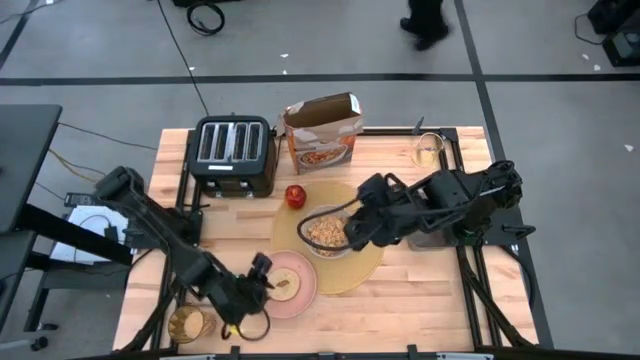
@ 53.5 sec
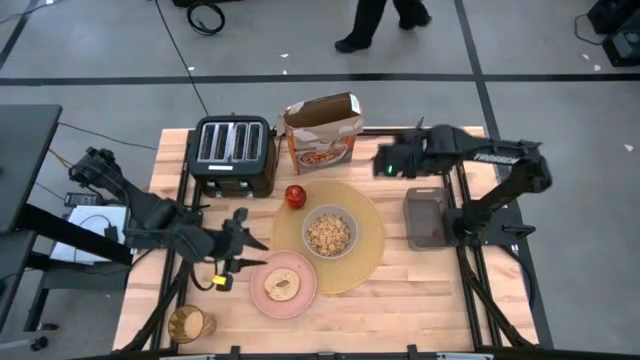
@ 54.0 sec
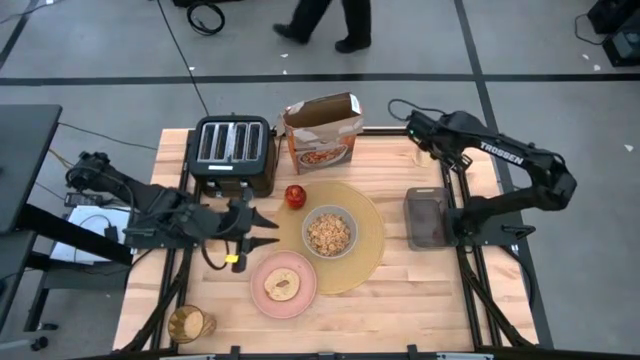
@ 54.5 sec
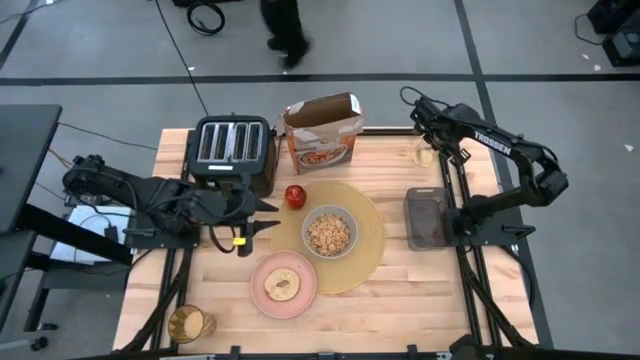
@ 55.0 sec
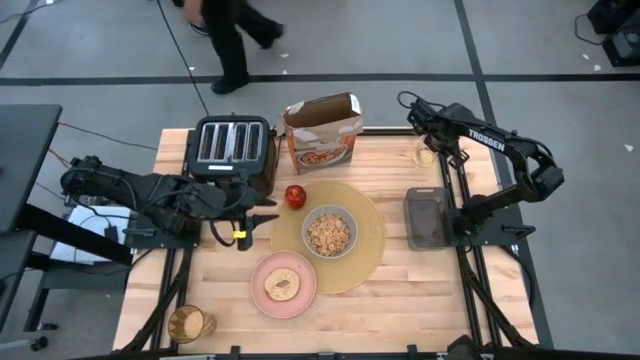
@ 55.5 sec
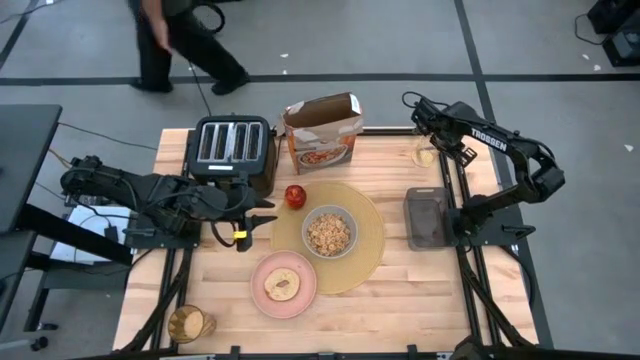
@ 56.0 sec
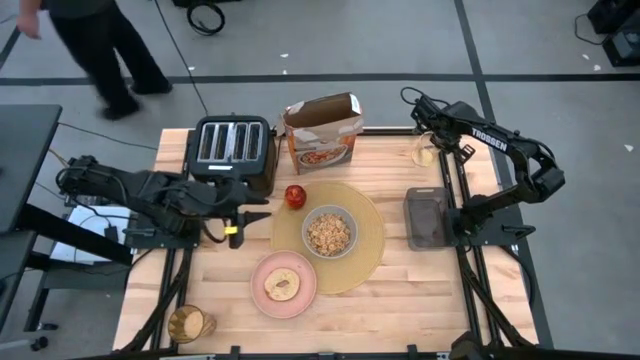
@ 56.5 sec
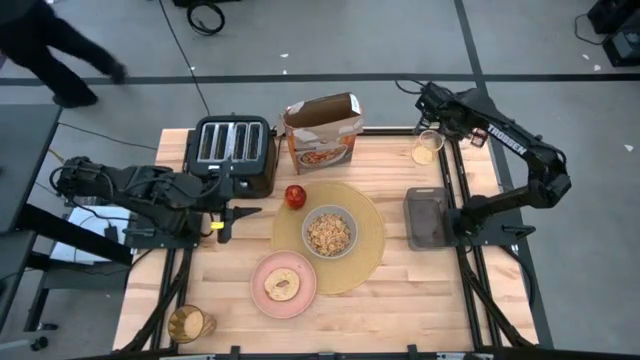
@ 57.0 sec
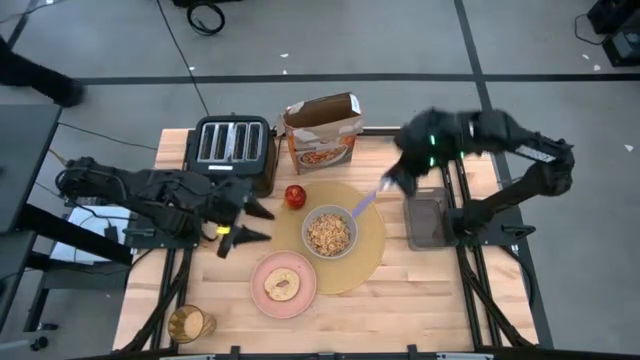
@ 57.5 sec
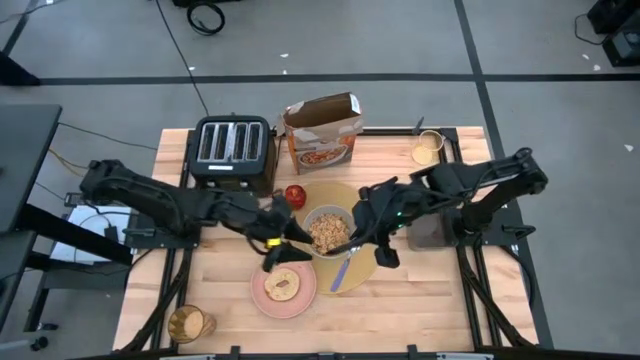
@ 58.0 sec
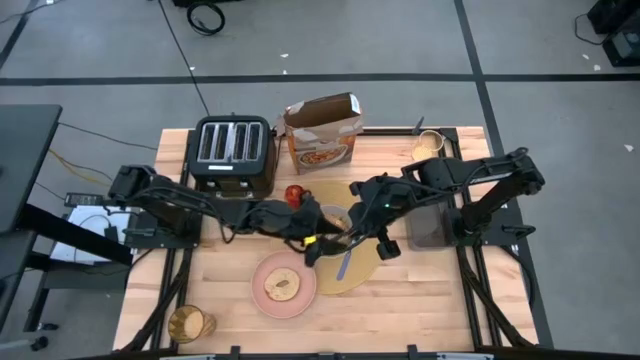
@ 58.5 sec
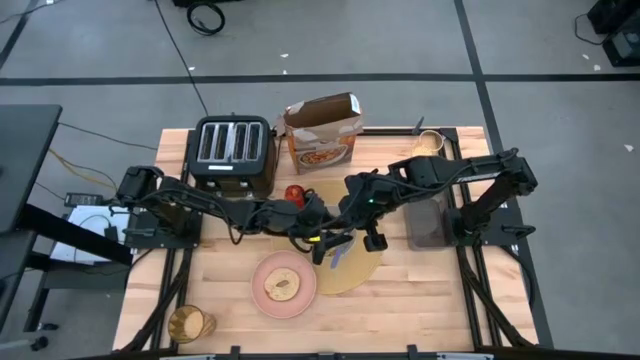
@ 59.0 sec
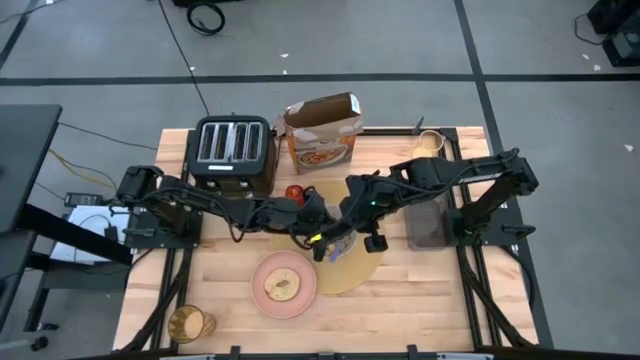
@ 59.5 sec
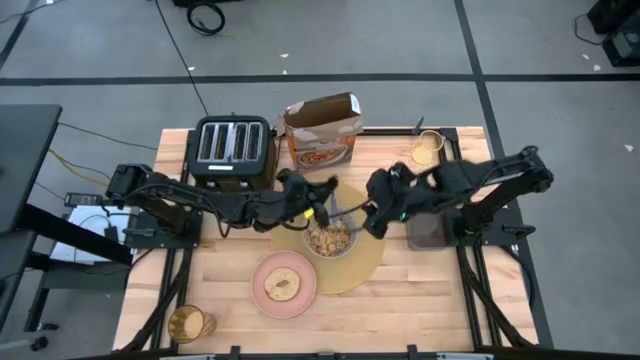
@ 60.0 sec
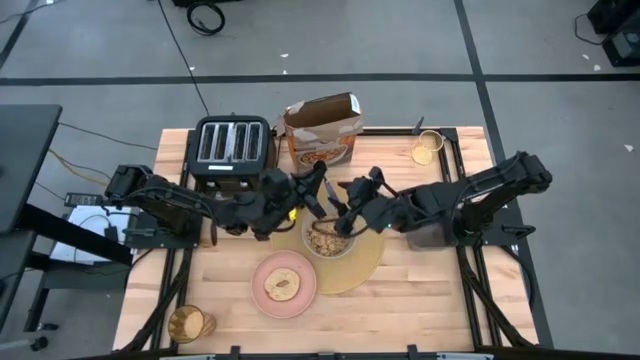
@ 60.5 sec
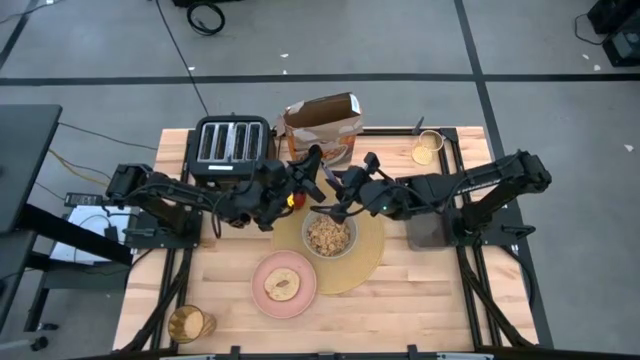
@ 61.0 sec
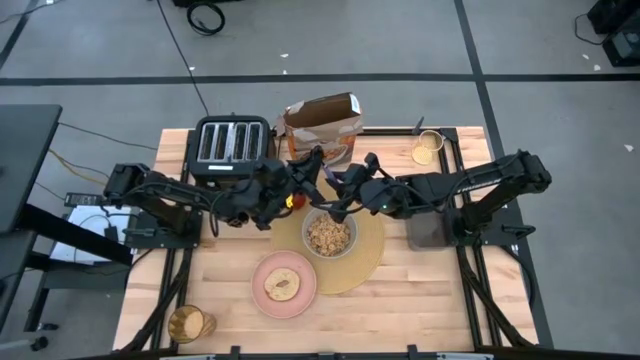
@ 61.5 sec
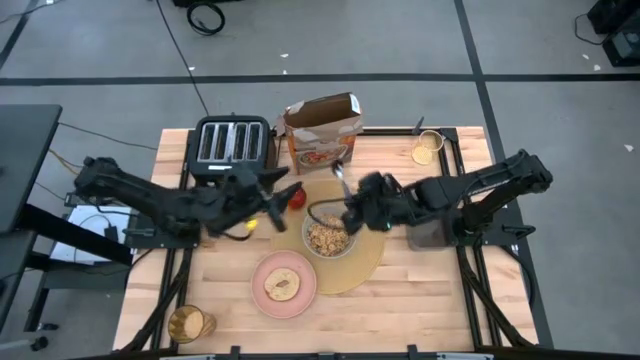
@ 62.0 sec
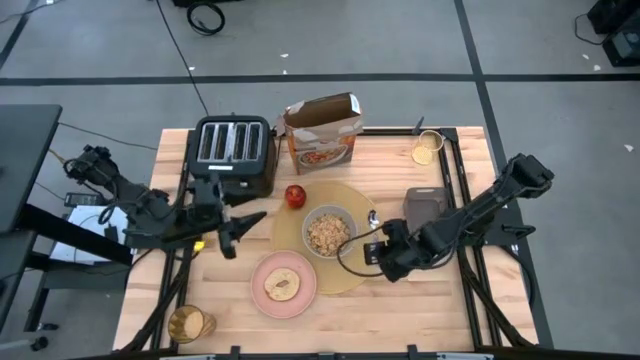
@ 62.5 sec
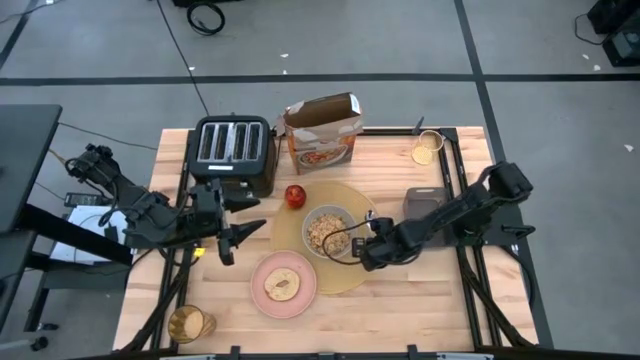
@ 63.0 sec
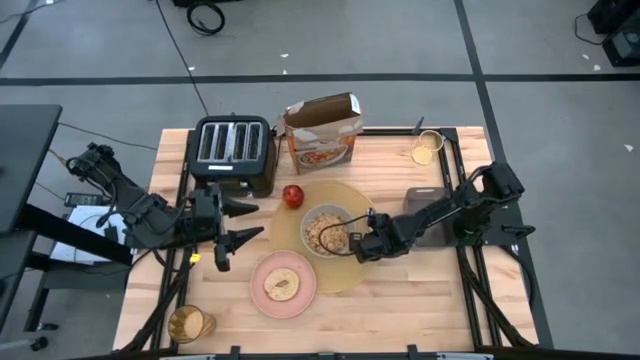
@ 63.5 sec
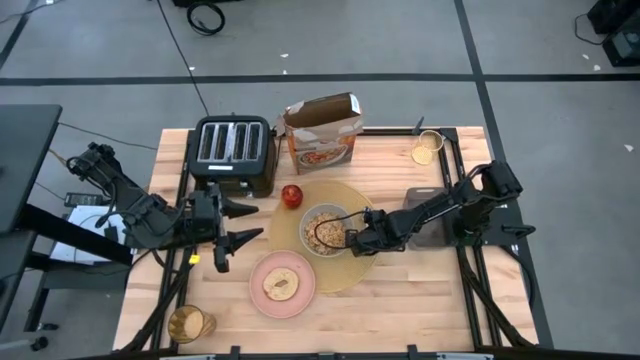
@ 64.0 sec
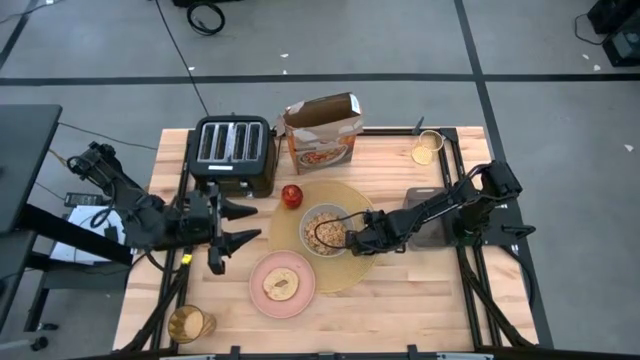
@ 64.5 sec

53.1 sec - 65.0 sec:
Task: Arrange a breakfast setting
Put the purple spoon on the brown table mat to the right of the gray bowl

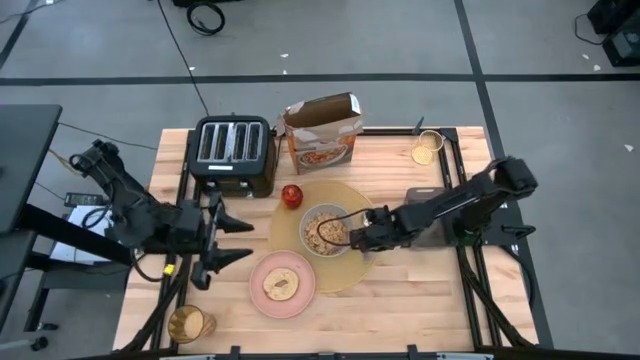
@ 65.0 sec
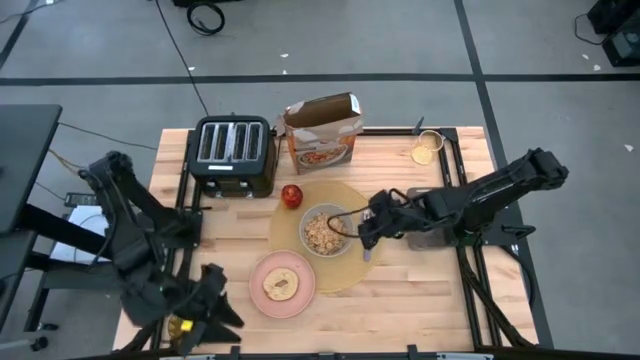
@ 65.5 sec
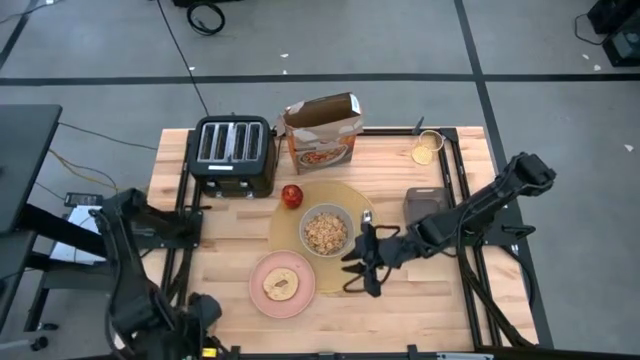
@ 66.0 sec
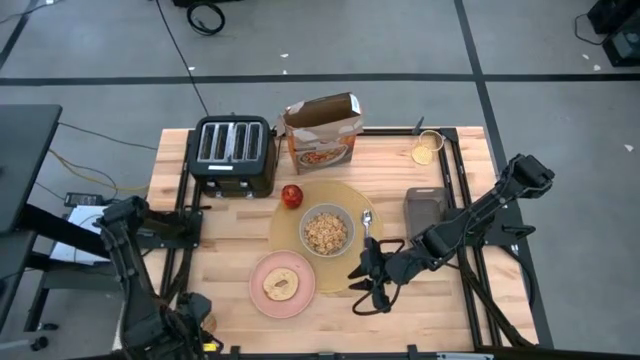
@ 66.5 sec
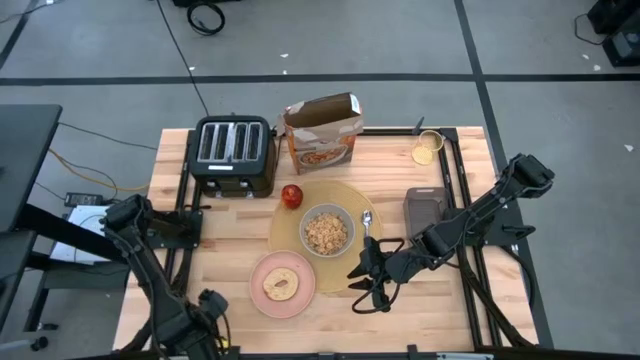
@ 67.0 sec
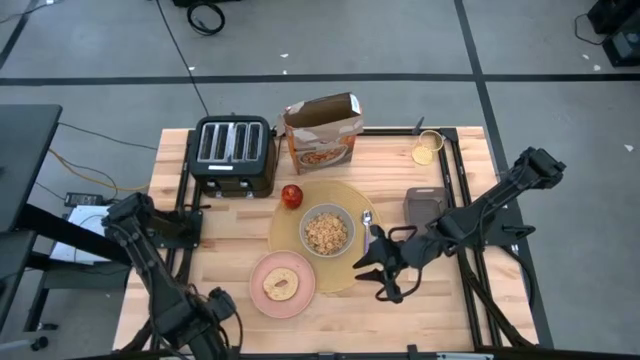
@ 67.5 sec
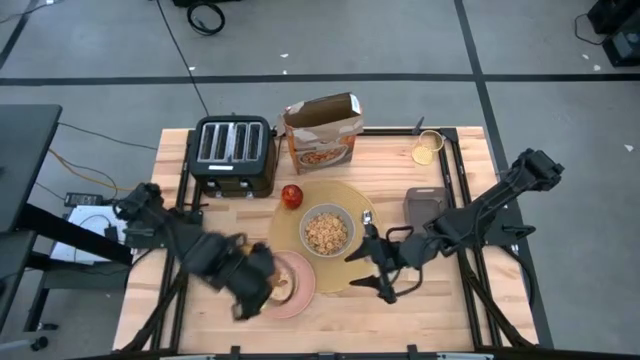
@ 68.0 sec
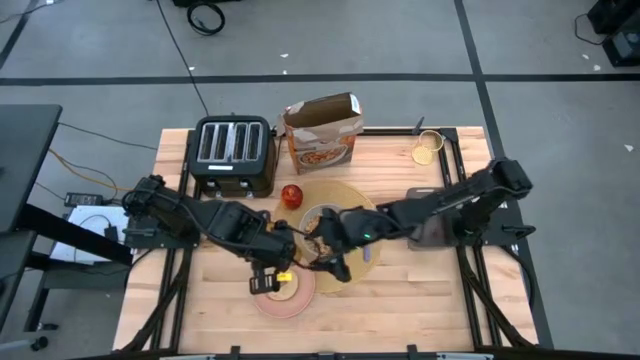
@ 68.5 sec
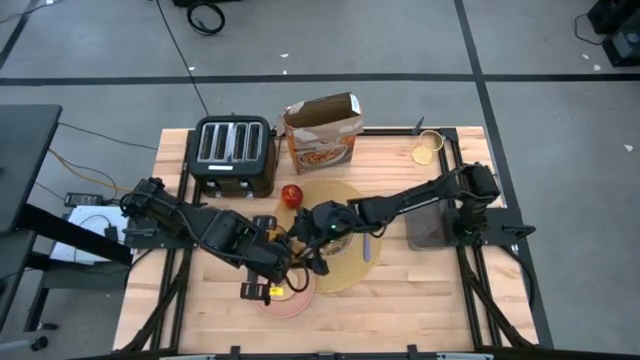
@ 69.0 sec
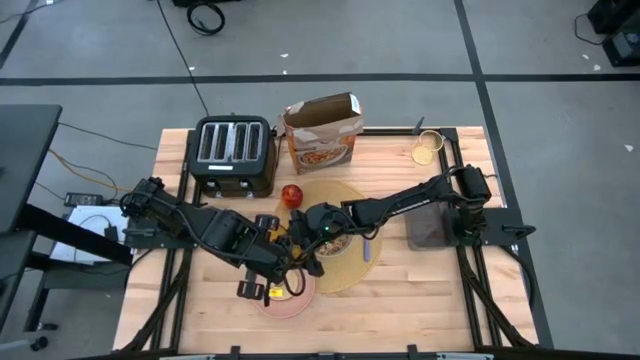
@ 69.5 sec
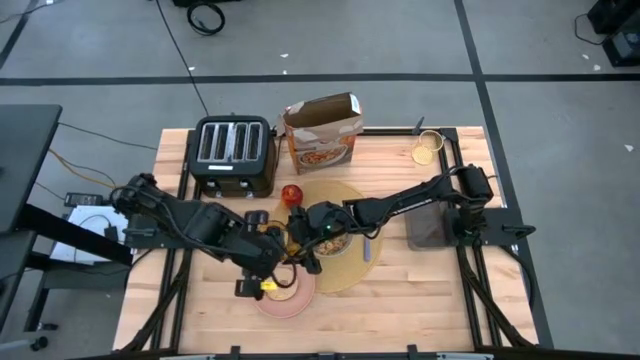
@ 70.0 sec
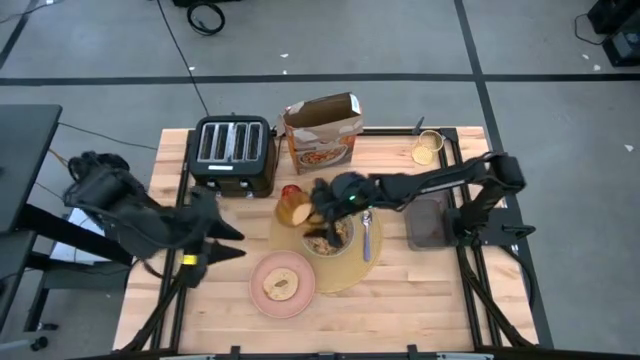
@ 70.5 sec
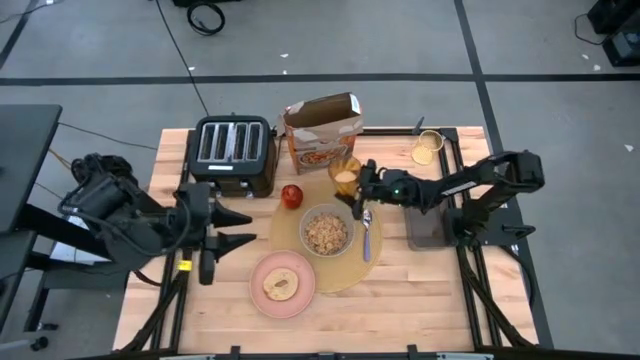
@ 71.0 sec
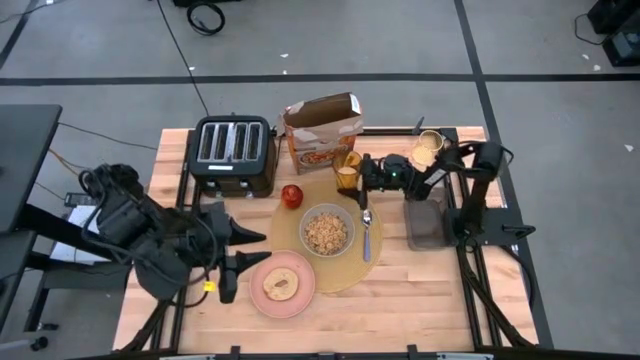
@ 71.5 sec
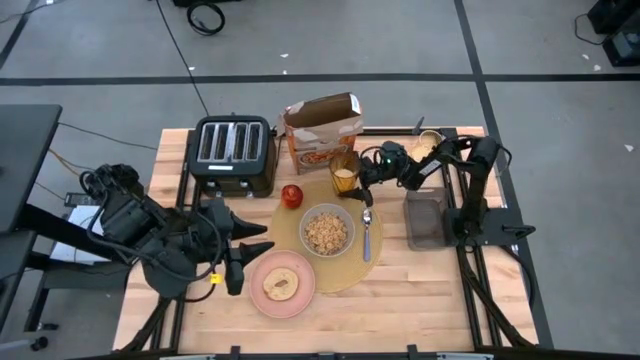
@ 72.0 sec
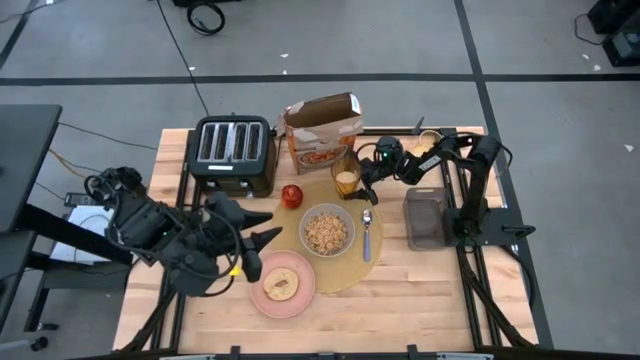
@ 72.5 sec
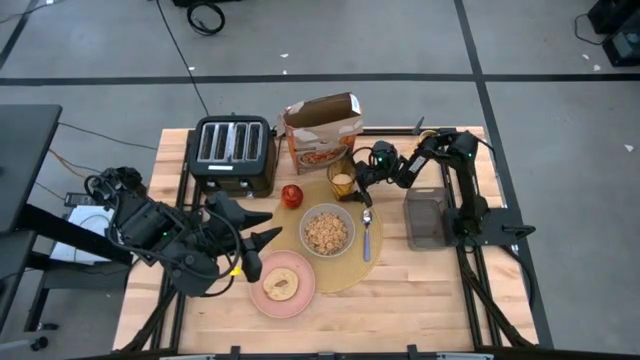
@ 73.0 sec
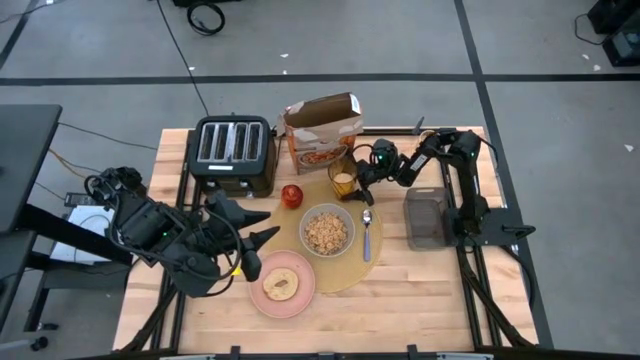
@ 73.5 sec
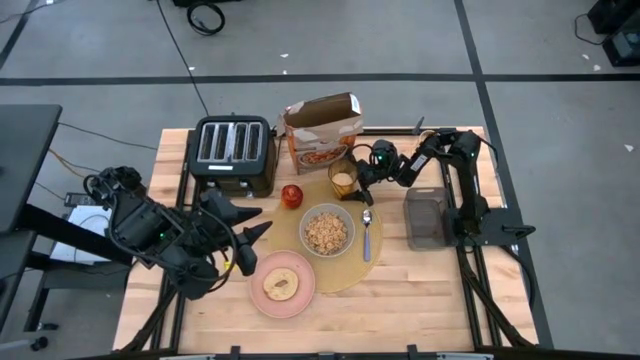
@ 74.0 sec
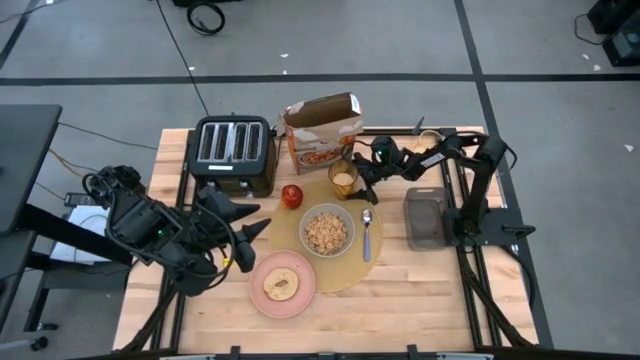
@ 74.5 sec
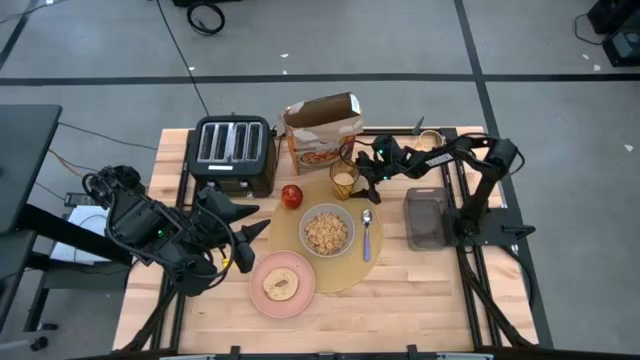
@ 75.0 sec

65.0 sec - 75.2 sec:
Put the orange cup on the brown table mat to the top right of the gray bowl
